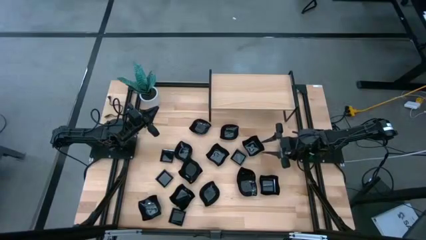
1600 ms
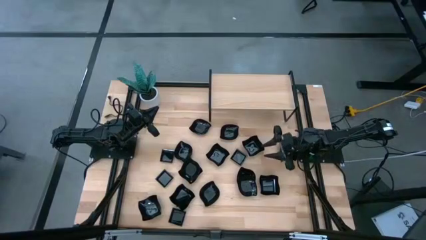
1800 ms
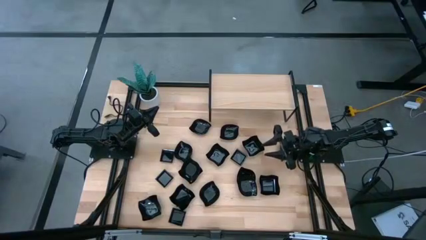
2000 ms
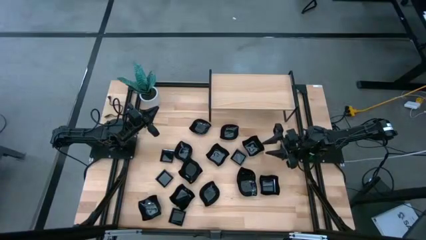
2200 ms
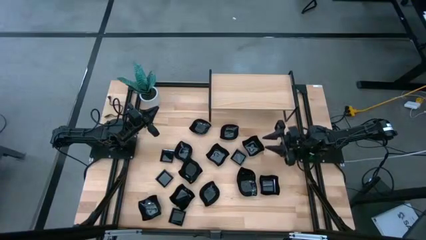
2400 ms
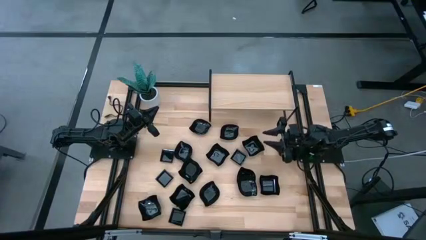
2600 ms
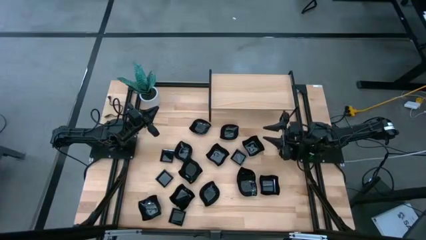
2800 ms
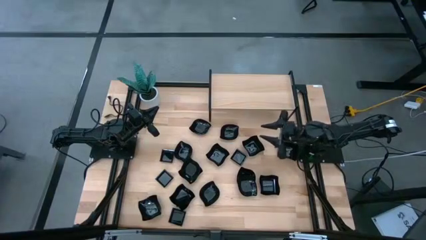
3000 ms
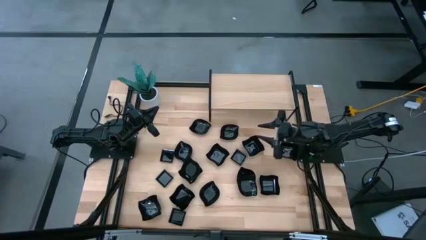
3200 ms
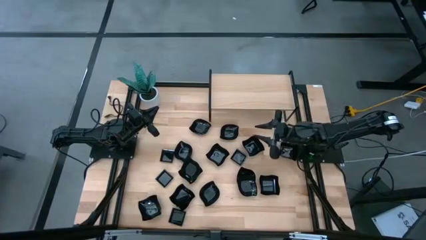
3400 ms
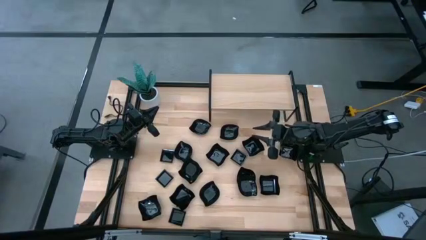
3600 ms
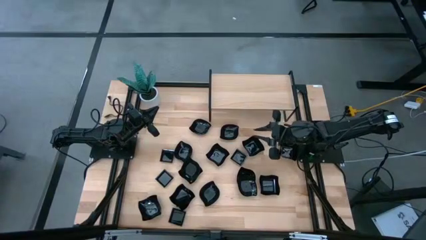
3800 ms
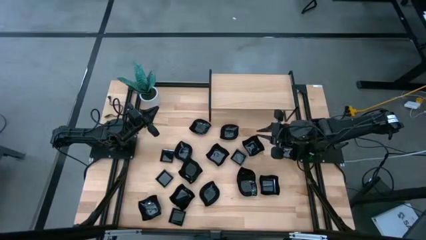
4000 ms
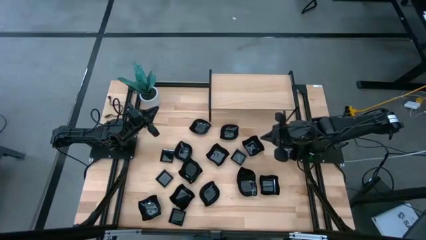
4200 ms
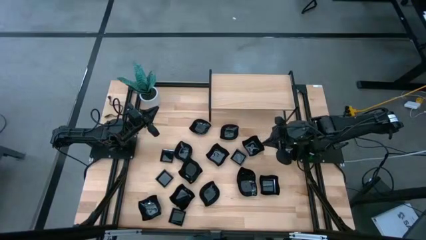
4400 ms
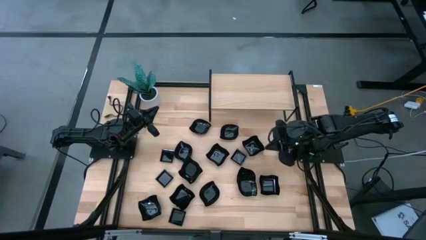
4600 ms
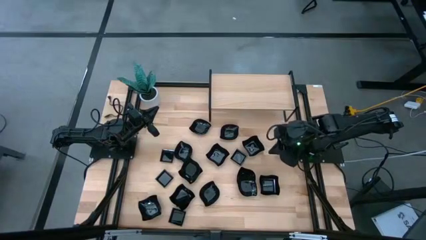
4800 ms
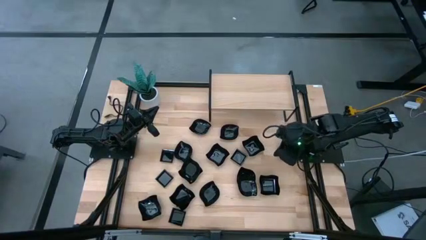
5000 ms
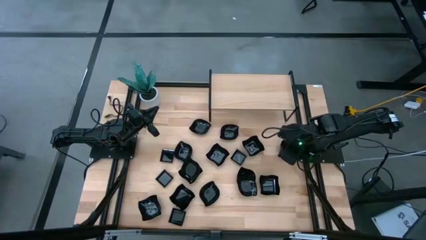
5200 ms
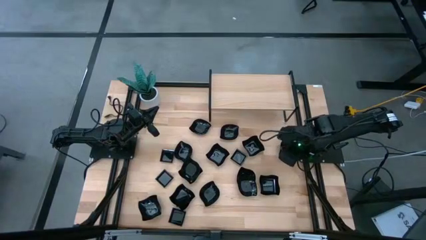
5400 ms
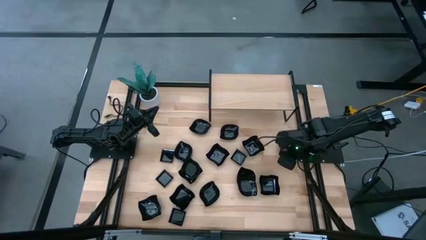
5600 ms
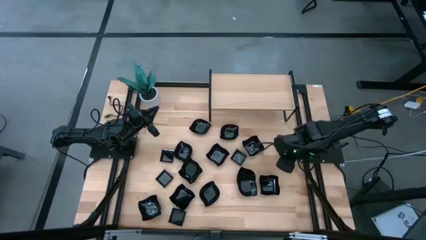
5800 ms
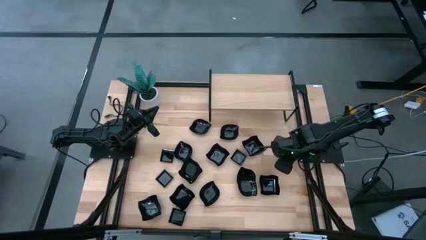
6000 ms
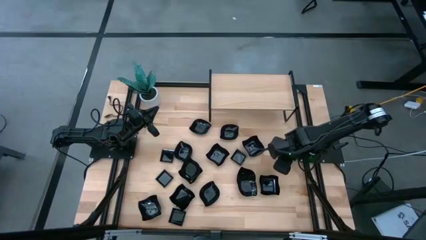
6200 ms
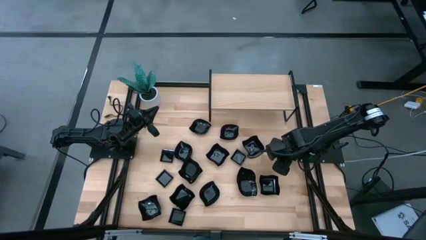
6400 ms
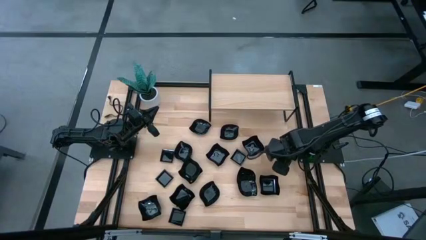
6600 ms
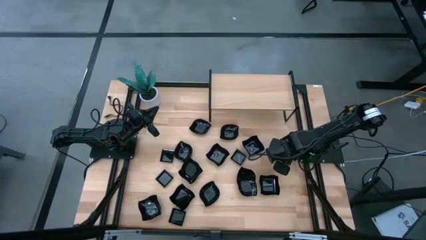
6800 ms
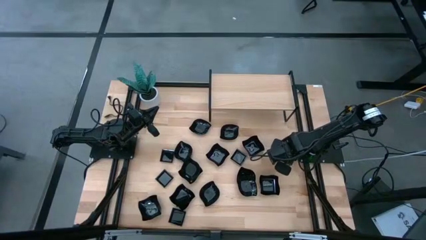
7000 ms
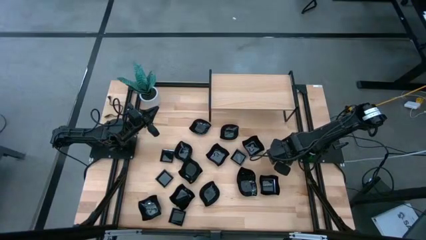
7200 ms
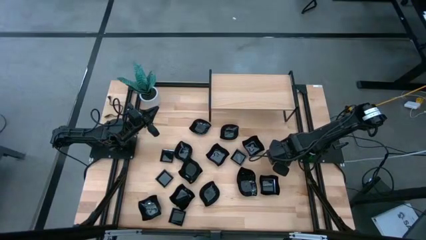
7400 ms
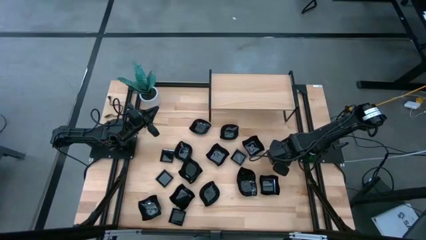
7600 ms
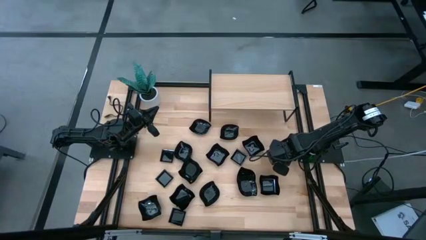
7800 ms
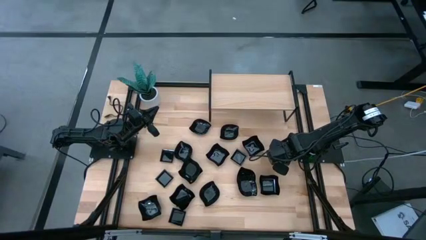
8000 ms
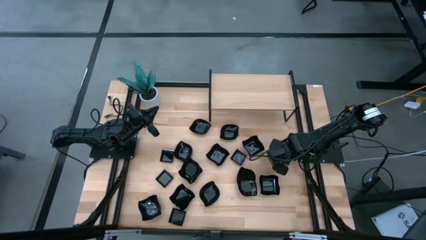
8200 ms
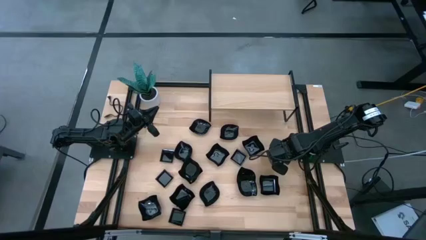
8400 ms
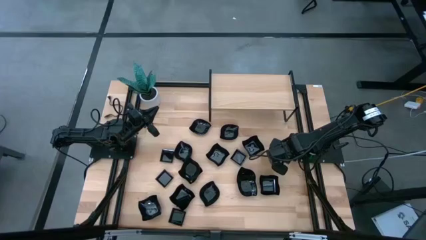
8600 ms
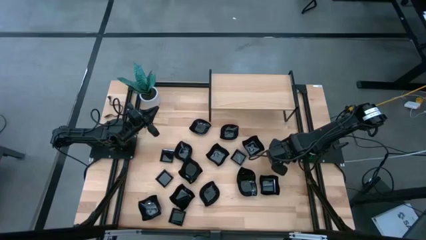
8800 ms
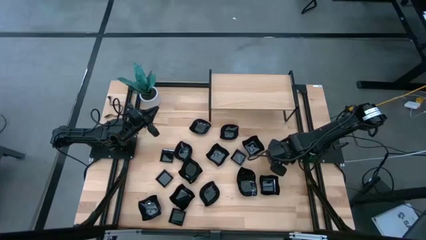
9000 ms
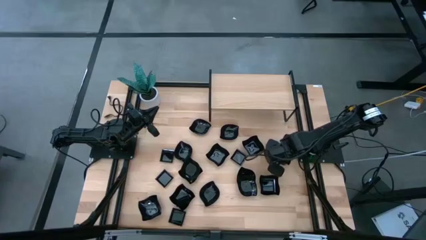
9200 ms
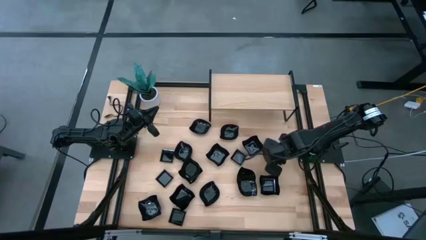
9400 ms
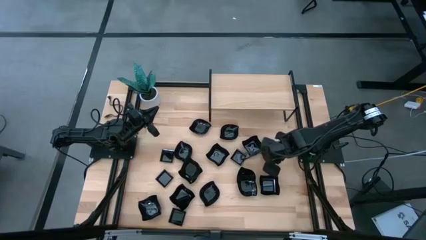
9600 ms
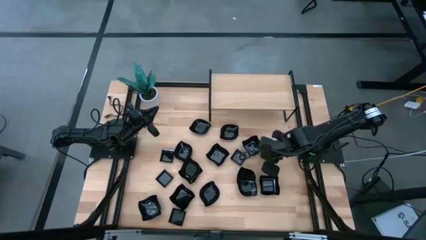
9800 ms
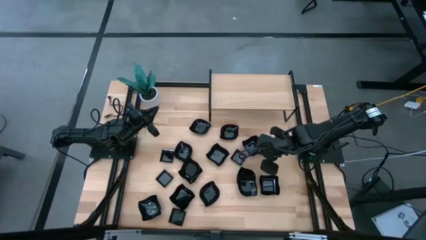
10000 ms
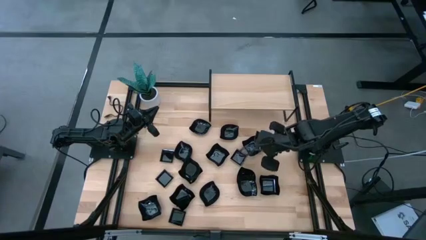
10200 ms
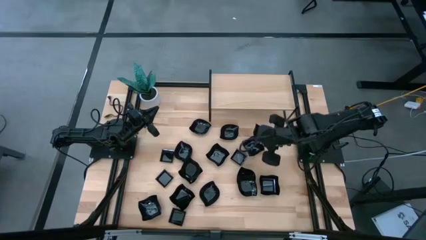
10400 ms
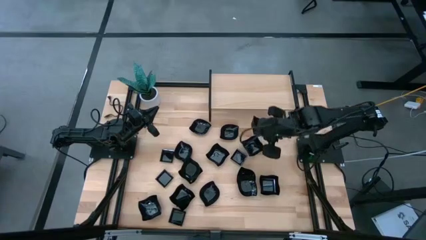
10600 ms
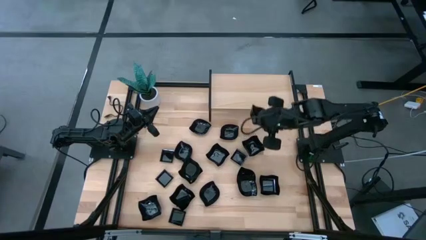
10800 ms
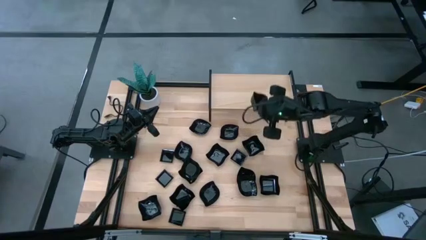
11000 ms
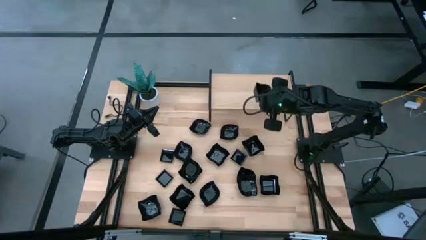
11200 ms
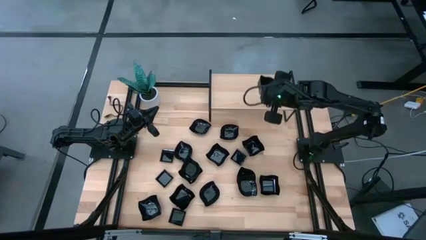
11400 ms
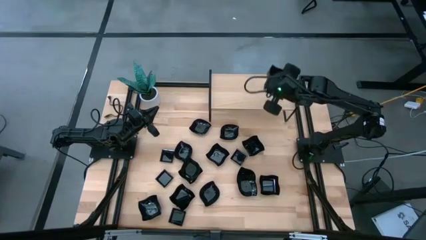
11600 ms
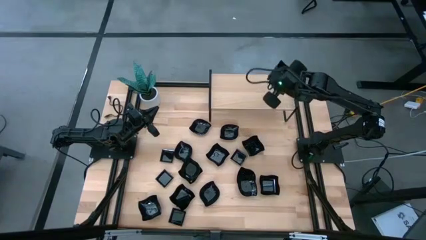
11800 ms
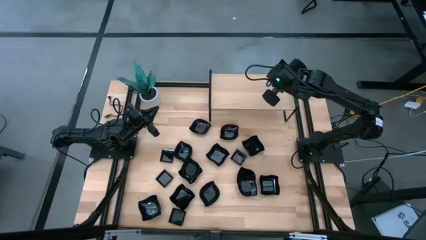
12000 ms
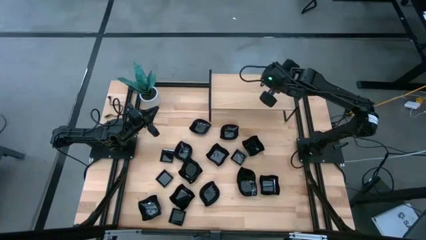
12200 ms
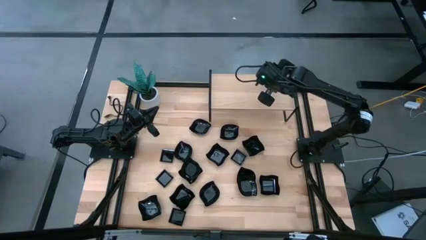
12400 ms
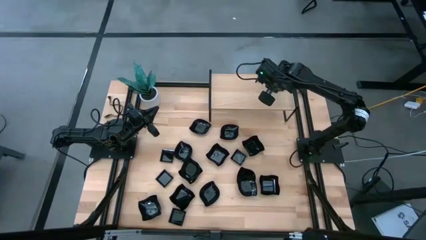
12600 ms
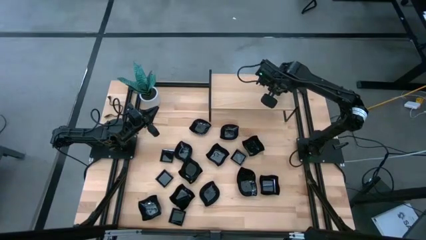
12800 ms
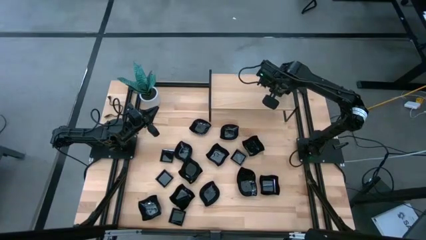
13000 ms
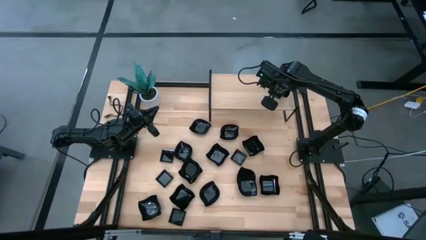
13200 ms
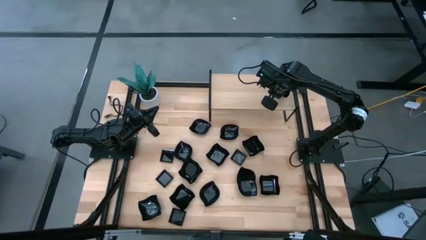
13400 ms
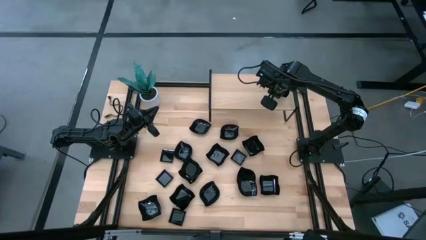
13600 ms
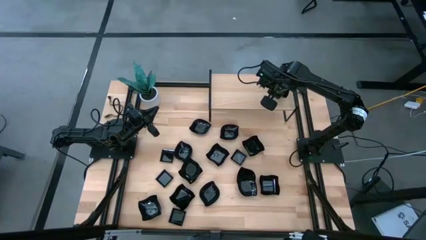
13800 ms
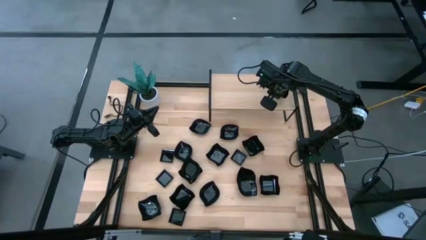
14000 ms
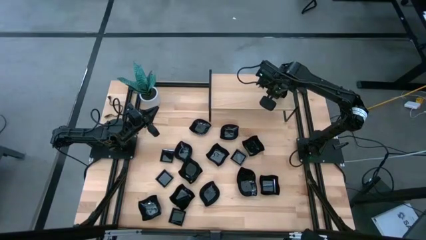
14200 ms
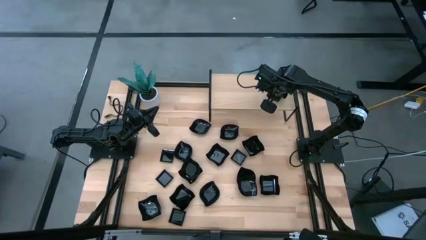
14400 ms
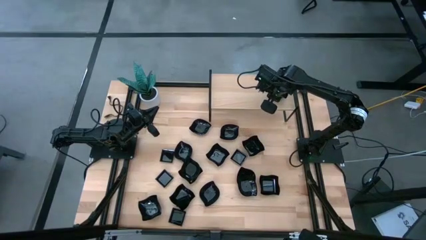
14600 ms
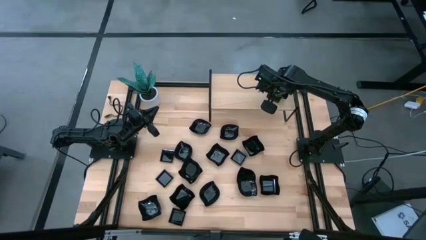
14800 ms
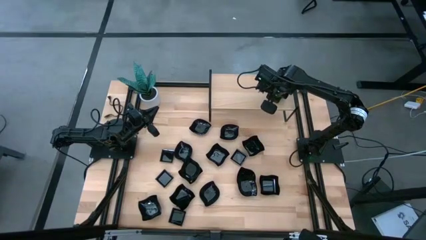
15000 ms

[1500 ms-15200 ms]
Task: Pick & Place Mini shaped plates
Put the black distorted square plate on the shelf
